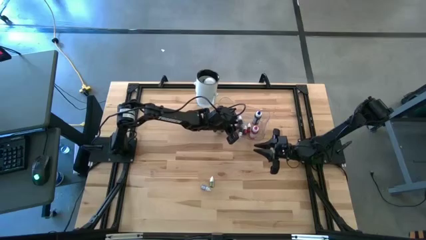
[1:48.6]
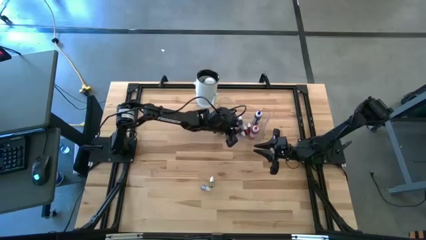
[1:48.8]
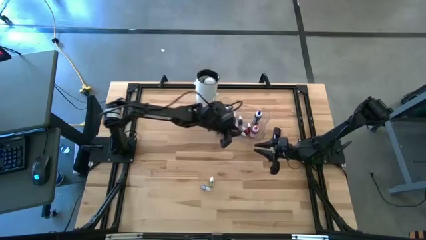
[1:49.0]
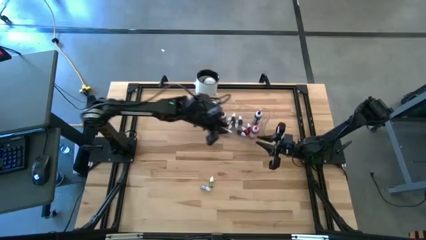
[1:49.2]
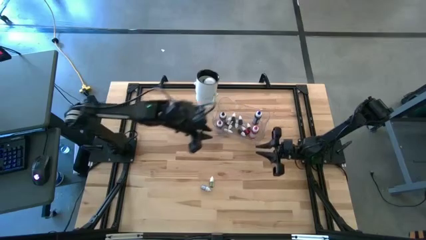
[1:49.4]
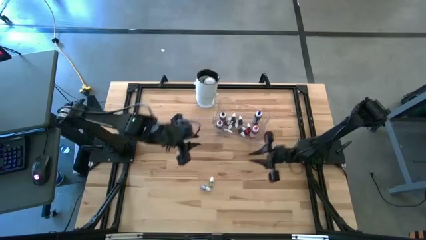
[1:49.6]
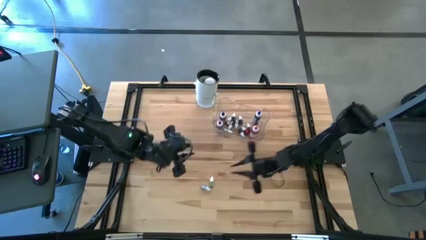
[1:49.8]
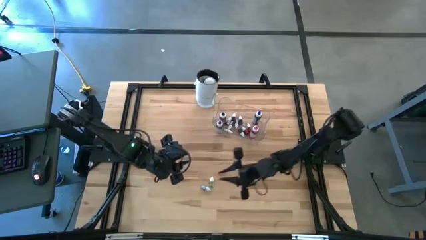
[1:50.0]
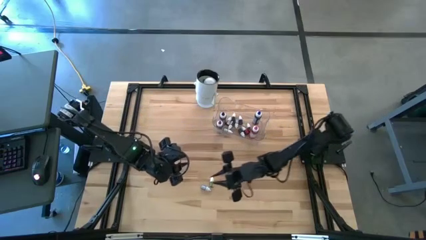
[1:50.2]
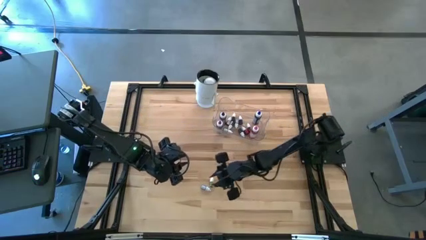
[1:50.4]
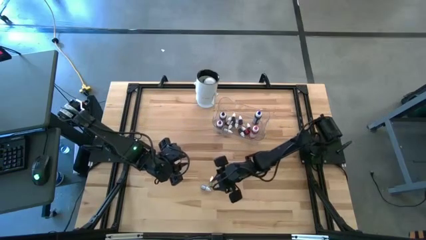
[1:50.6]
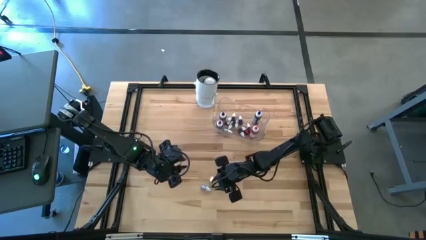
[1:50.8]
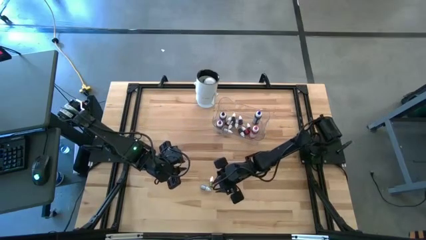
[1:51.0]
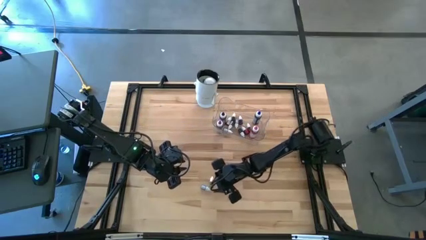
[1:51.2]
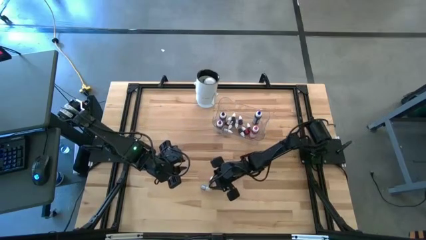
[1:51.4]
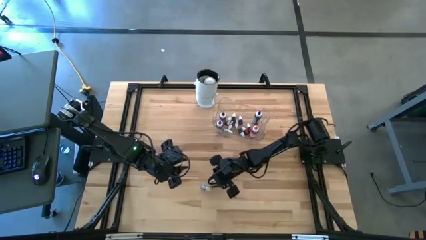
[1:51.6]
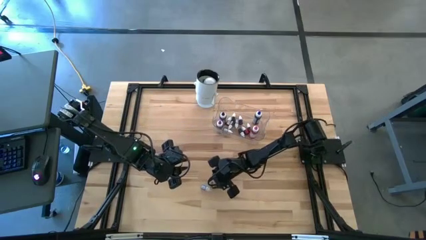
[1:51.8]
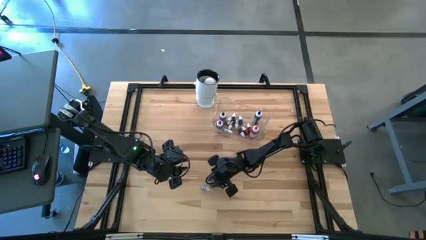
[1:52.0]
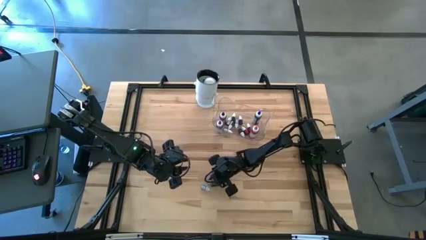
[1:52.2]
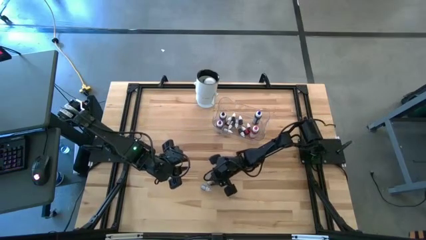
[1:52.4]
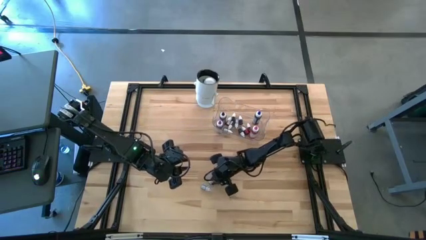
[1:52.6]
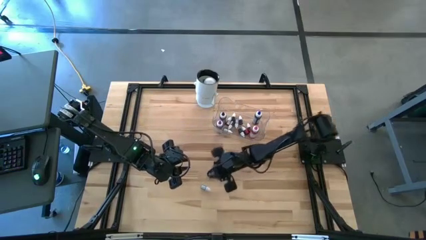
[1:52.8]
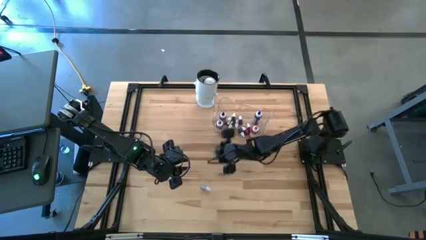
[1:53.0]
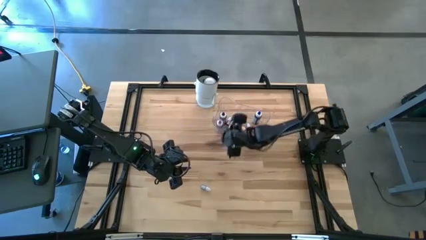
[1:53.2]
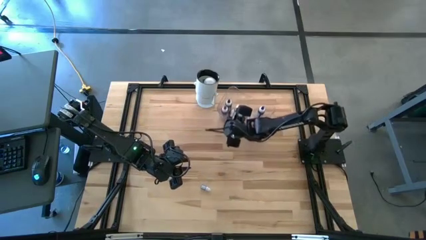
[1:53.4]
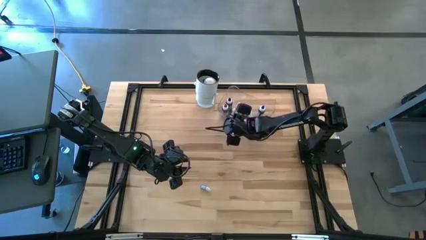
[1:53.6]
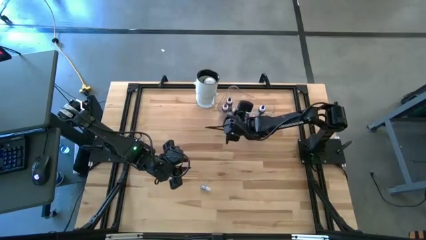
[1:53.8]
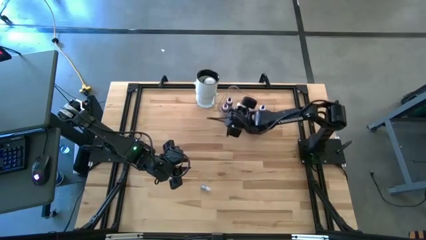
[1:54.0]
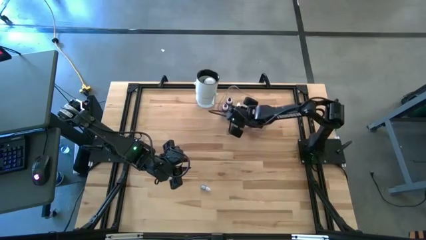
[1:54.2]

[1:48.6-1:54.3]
Task: Pick & Place food coloring
Put the small green food coloring bottle into the transparent container

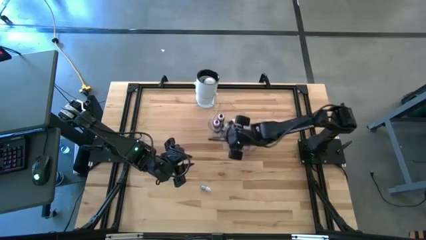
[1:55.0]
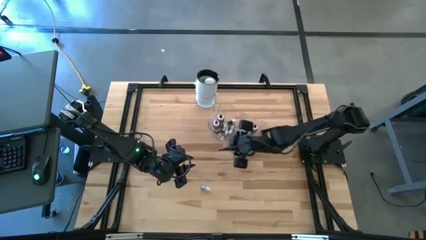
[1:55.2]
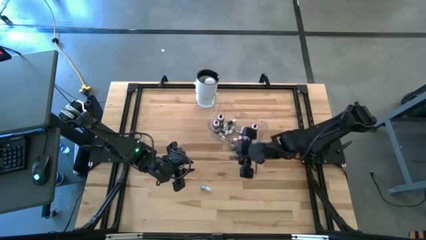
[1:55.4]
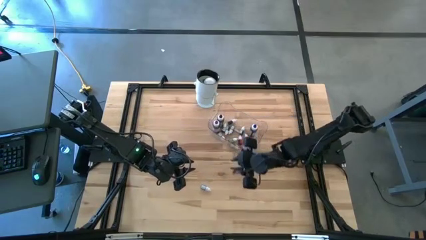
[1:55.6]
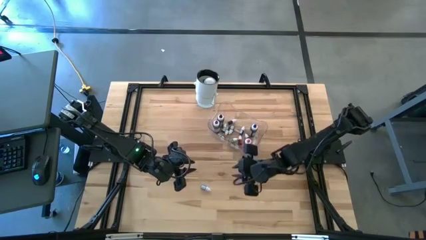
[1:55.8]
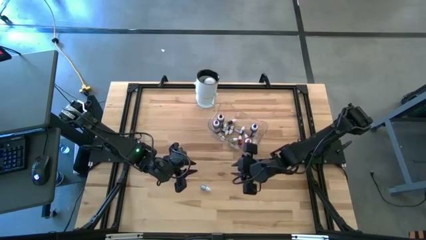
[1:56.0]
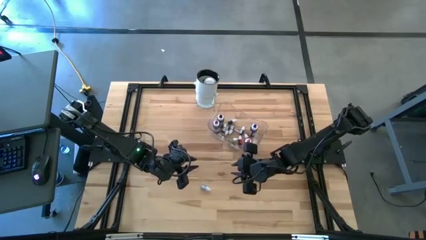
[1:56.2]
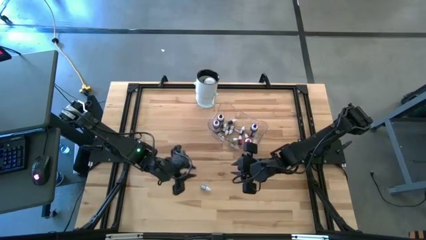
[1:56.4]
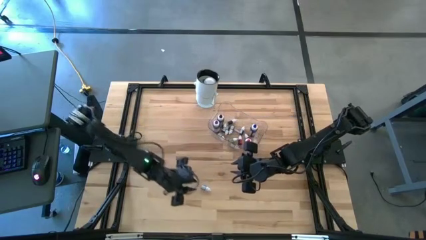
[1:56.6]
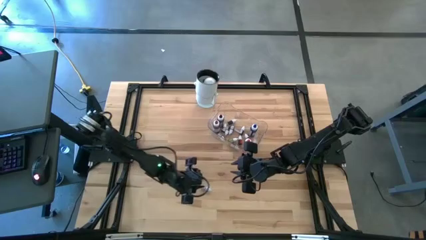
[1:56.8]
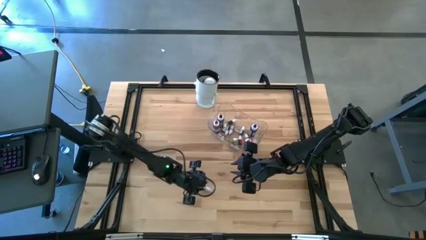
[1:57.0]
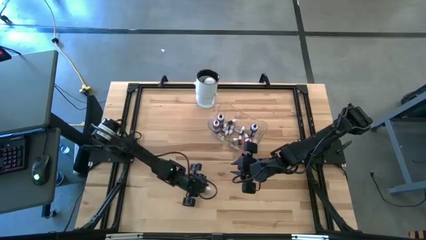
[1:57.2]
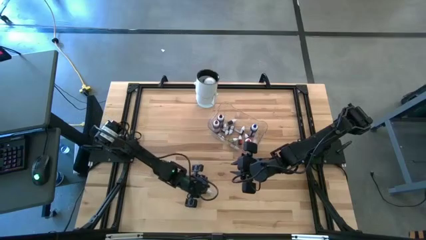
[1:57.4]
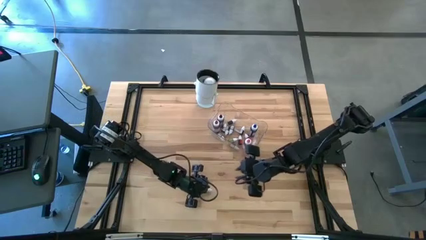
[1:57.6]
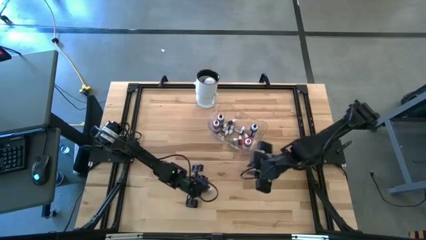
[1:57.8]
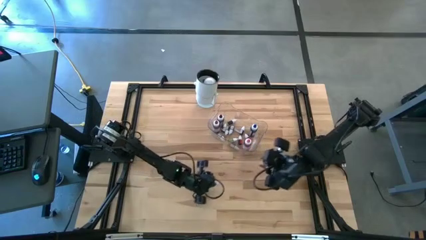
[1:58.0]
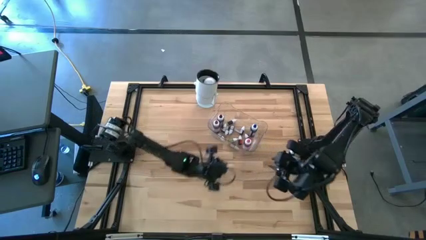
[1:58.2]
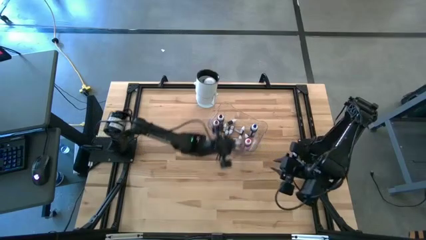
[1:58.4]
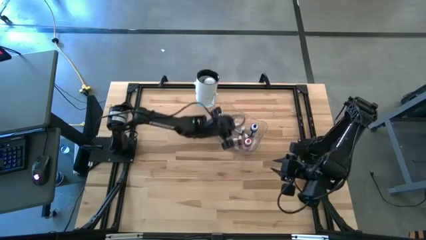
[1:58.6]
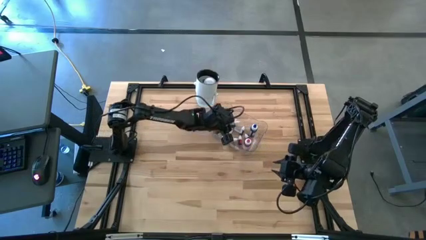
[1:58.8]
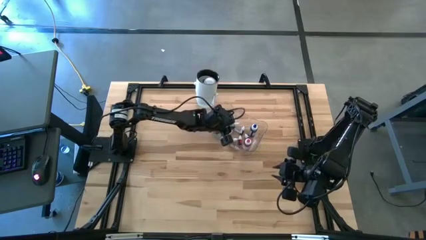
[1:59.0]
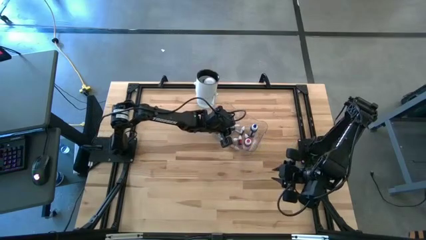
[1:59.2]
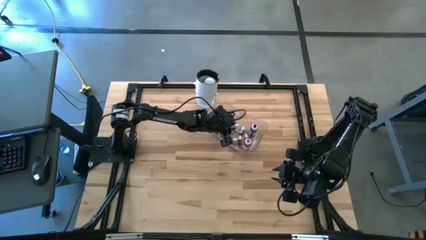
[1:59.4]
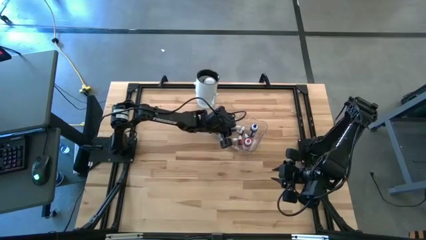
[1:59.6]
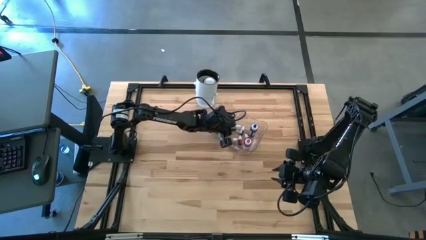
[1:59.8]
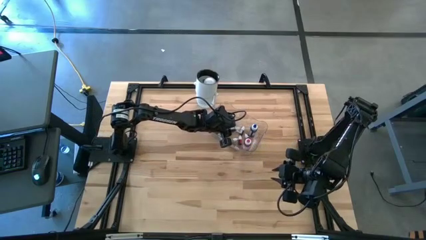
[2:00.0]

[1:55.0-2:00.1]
Put the small blue food coloring bottle into the transparent container

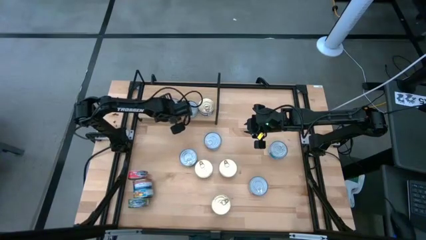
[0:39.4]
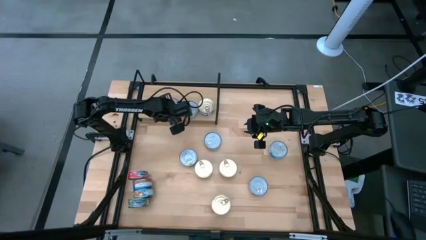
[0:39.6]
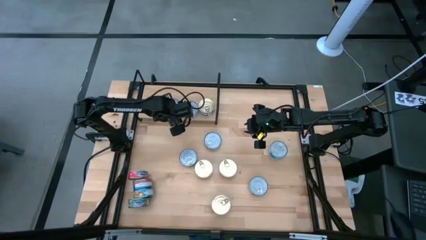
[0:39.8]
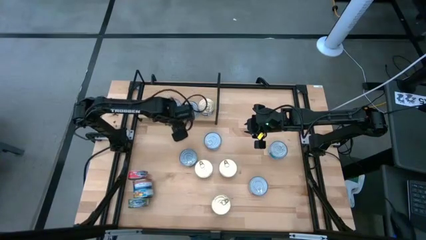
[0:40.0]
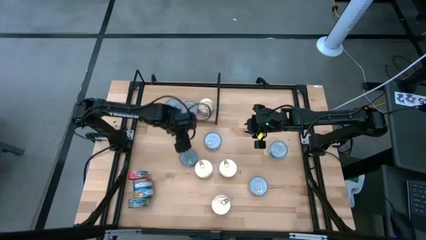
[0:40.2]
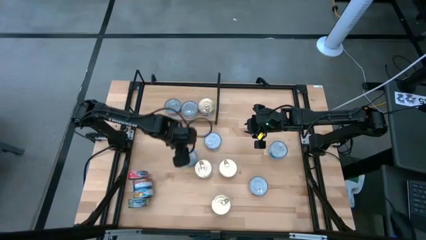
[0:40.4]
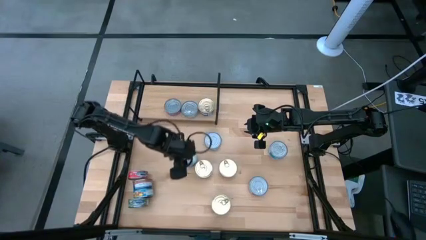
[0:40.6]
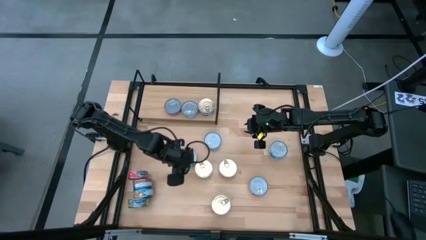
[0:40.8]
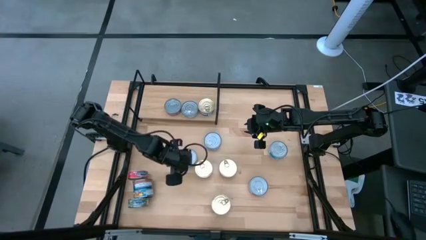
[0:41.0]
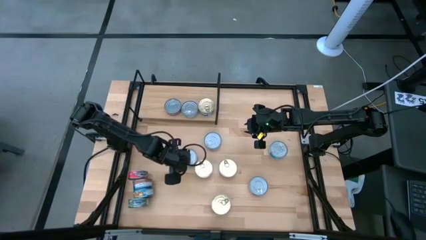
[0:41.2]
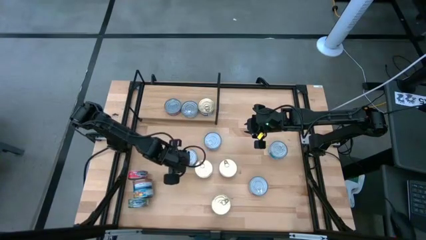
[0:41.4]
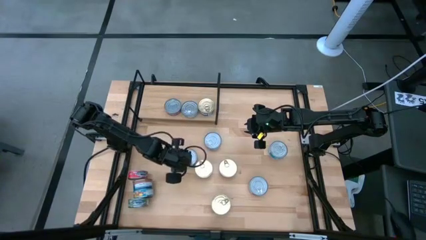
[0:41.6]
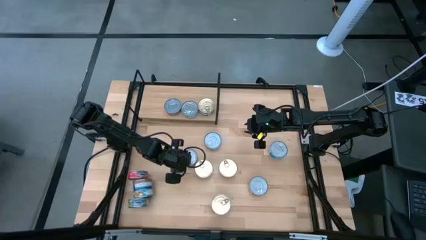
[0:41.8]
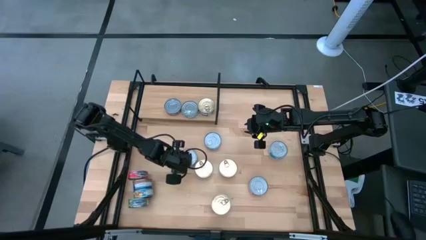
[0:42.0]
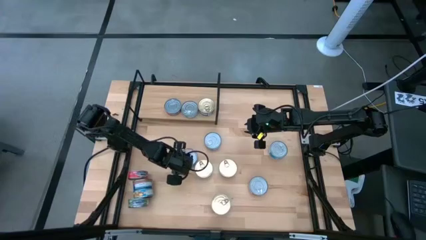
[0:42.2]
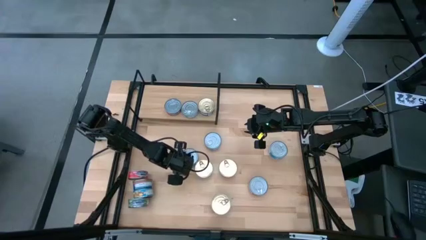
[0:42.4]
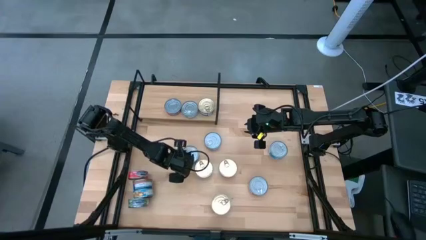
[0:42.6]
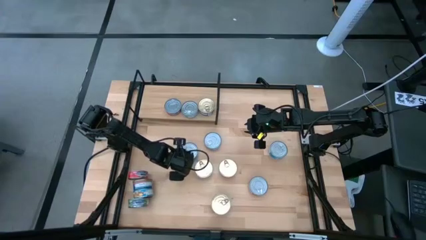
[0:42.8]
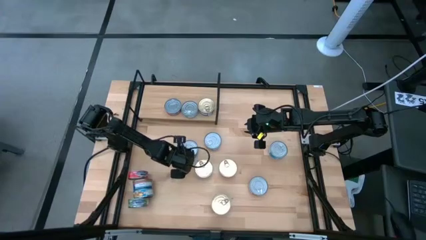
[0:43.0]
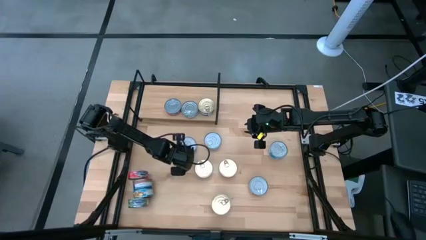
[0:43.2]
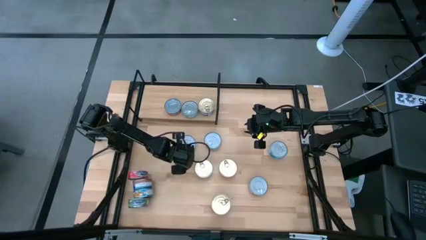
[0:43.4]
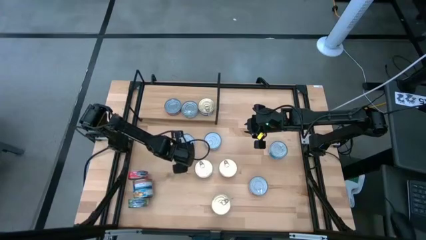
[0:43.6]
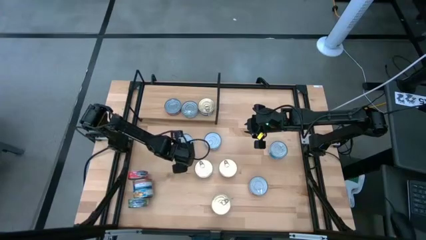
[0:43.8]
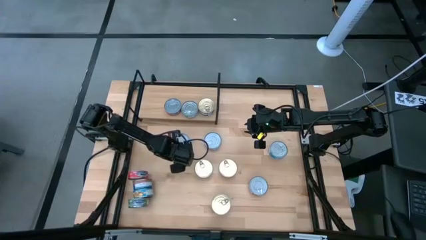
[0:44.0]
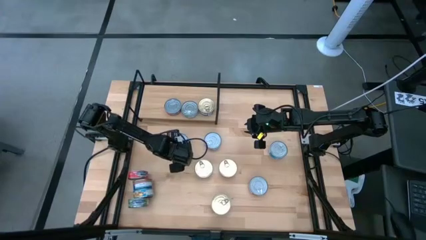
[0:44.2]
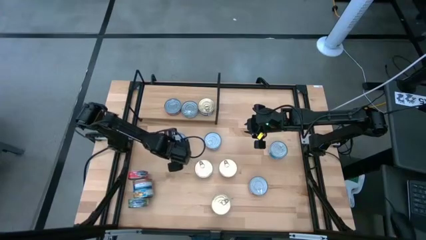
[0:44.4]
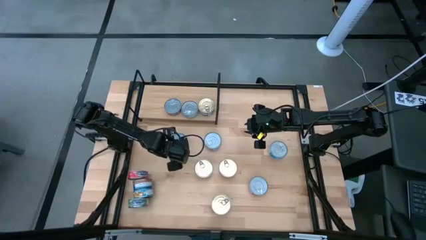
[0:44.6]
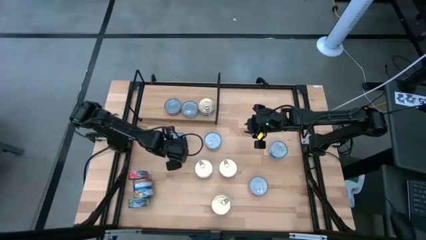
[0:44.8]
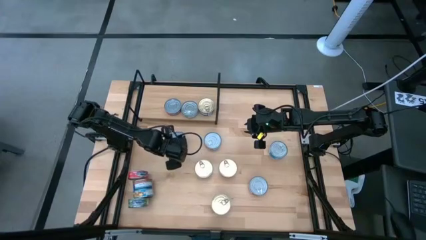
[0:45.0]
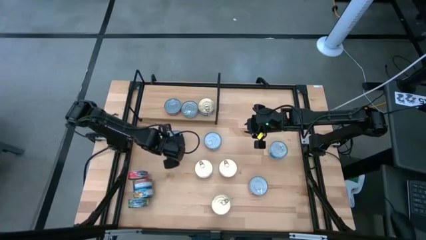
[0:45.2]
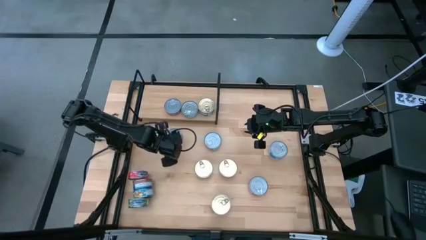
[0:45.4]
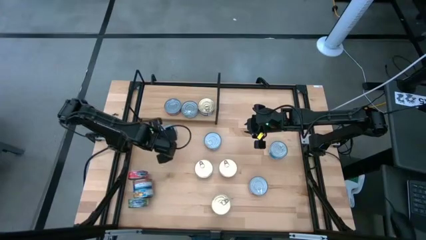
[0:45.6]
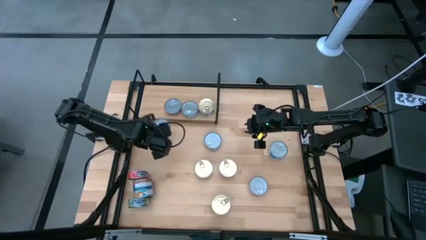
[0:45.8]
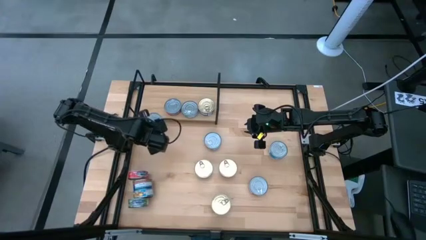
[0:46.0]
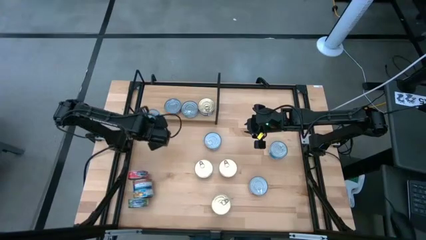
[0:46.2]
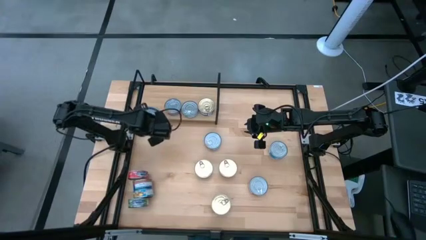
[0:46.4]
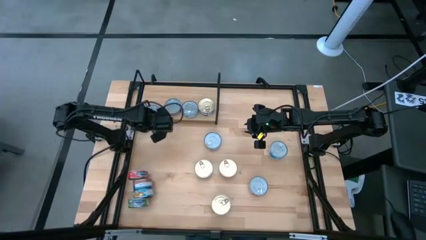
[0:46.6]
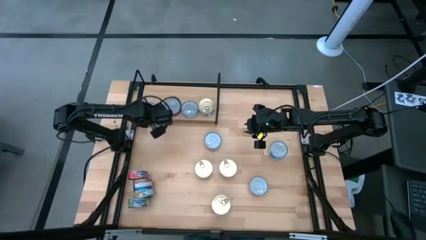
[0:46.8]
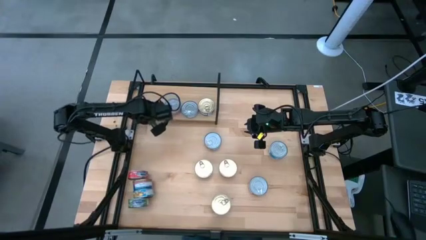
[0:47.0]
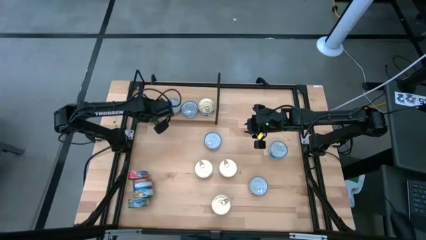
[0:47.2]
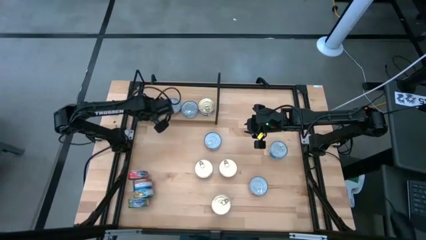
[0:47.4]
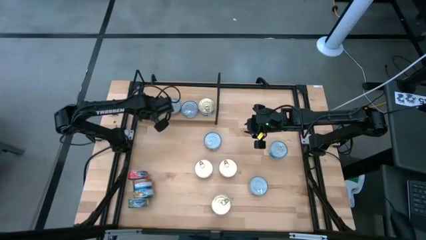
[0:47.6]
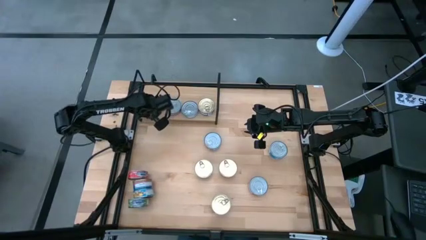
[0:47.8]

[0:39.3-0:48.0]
Task: Stack canned seafood by type on shelf
Put the top green tuna can on the shelf
